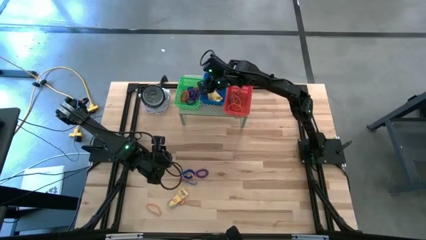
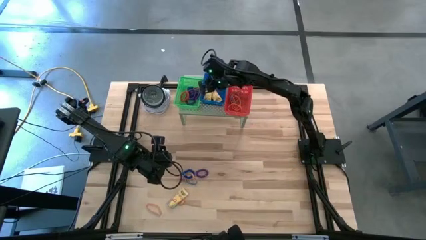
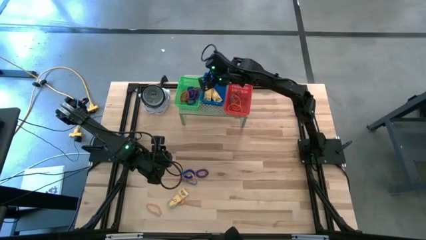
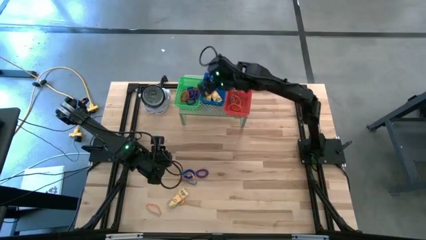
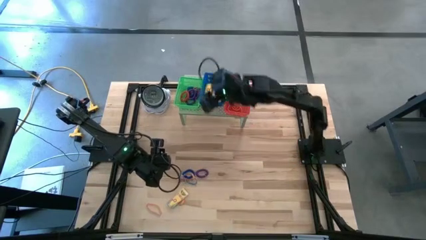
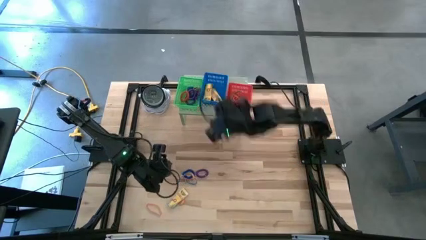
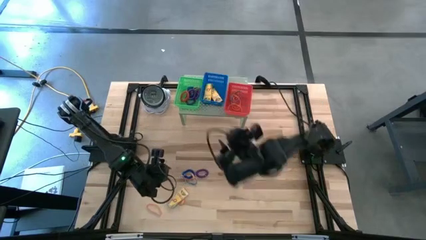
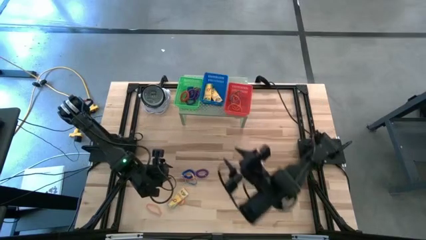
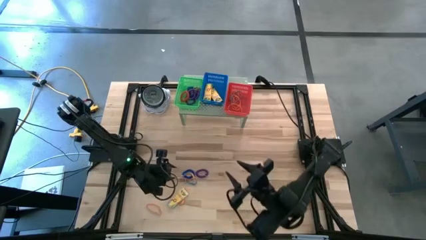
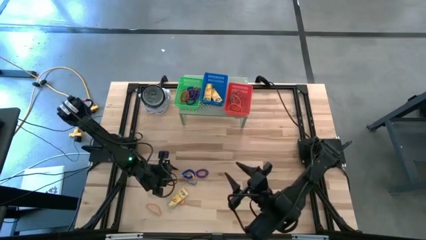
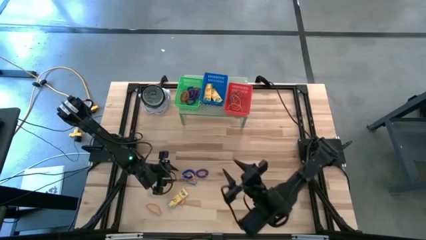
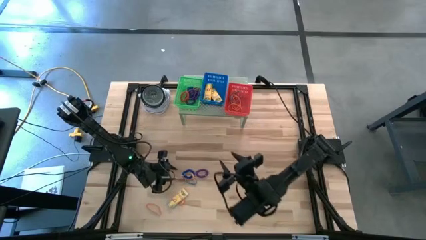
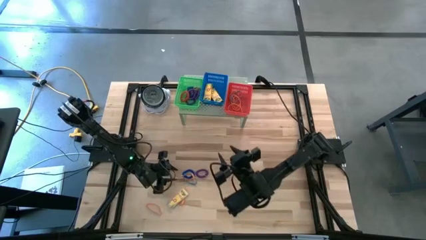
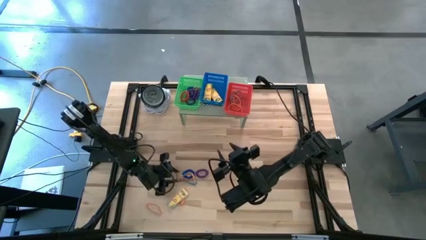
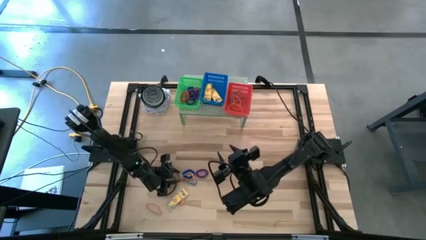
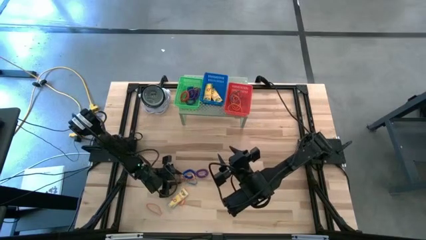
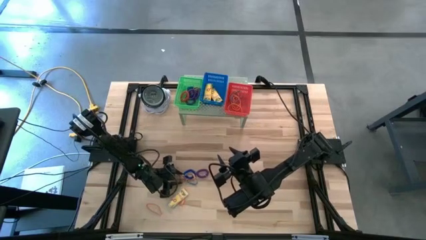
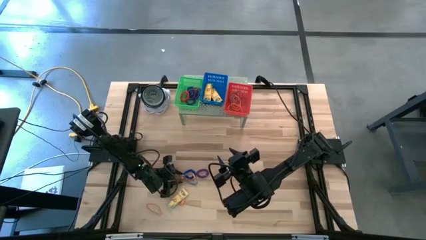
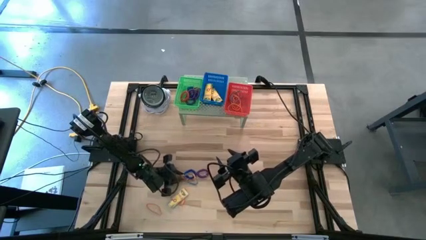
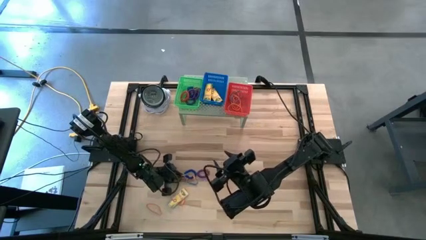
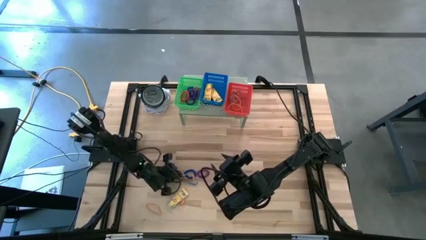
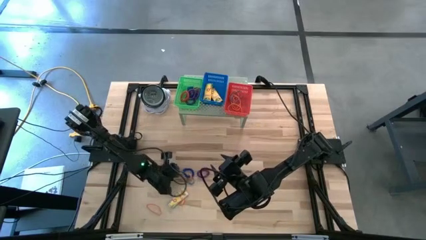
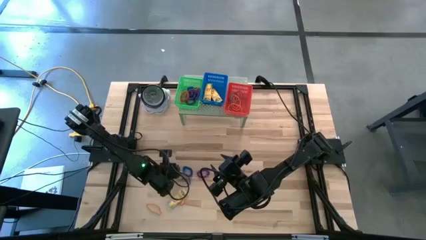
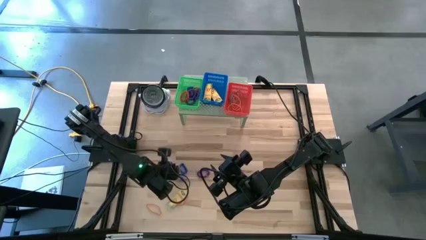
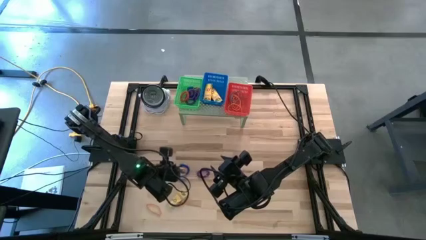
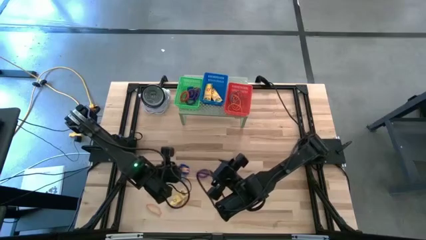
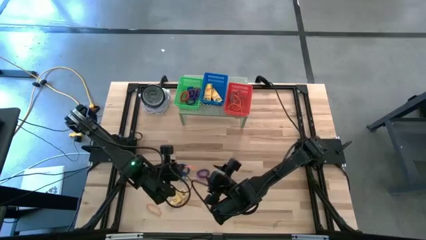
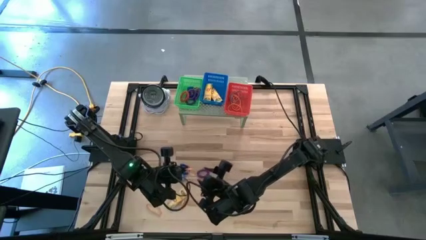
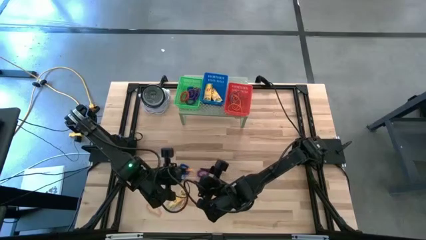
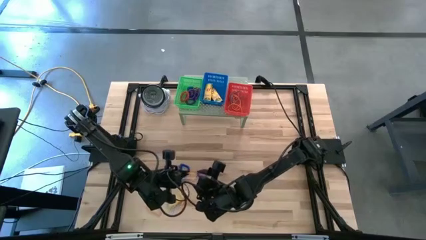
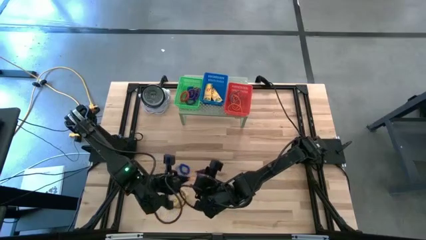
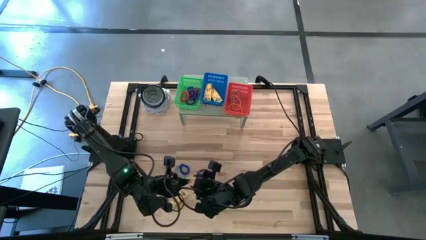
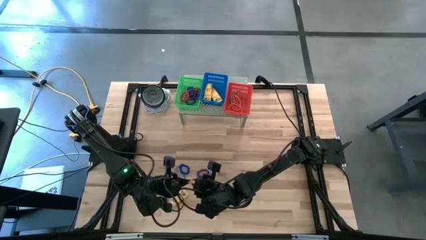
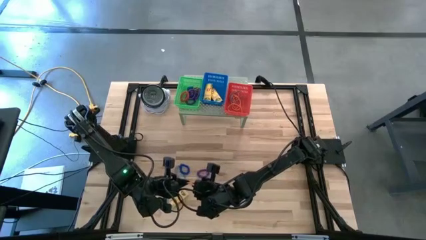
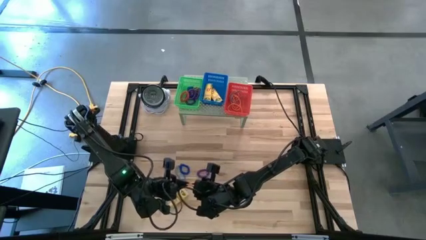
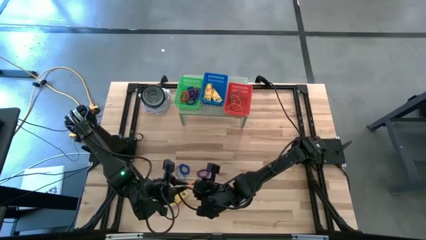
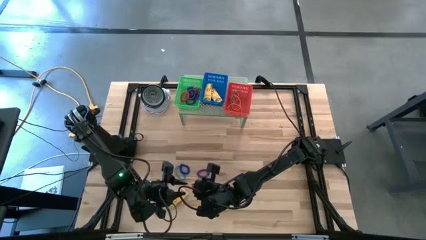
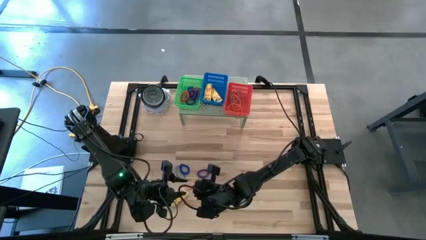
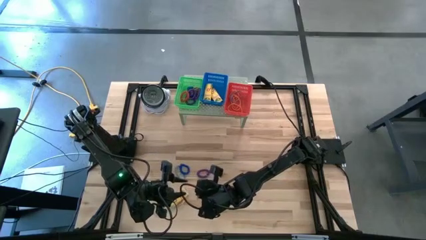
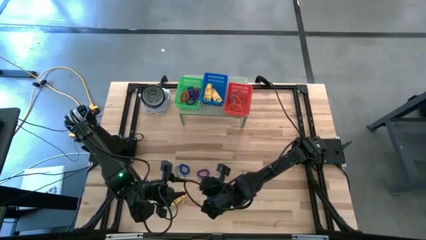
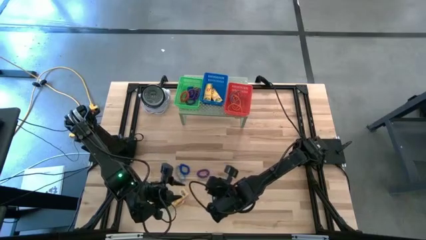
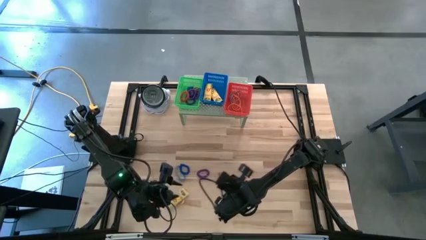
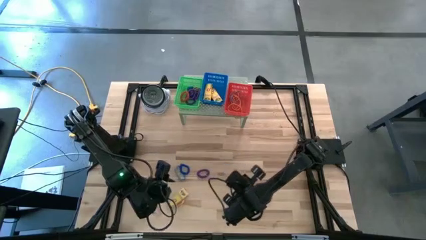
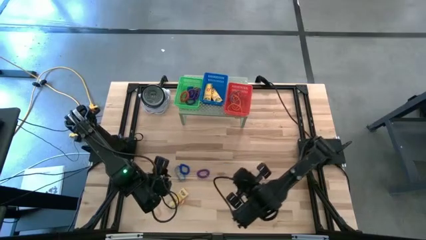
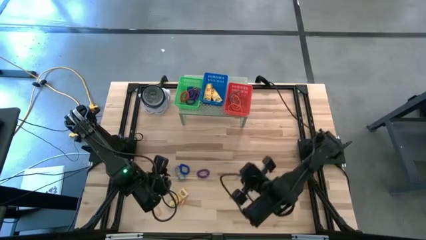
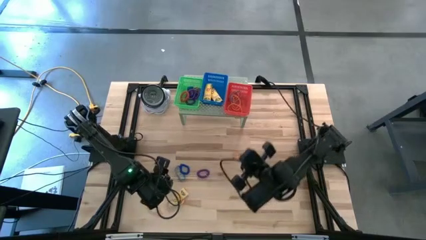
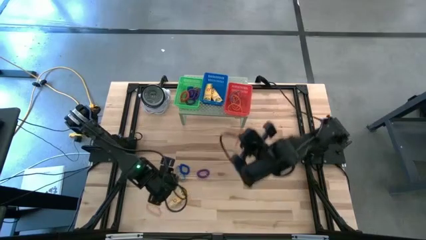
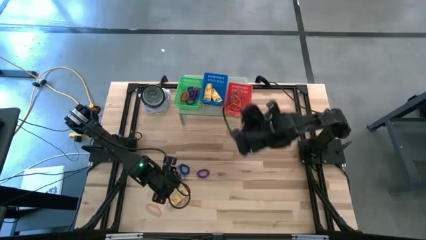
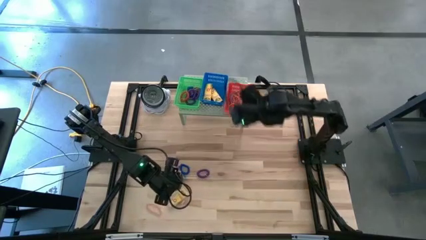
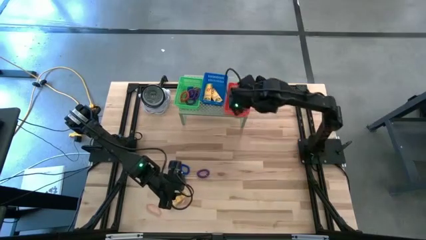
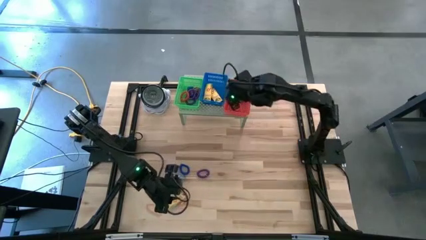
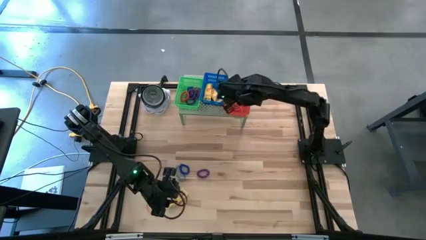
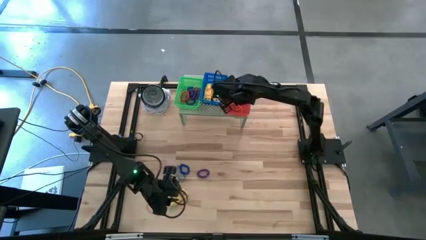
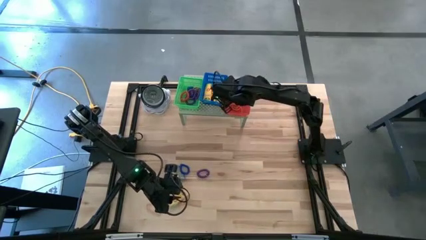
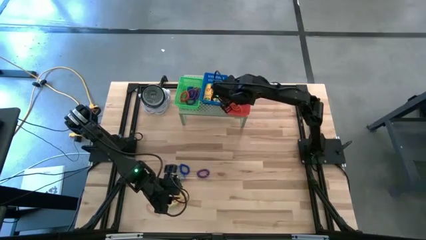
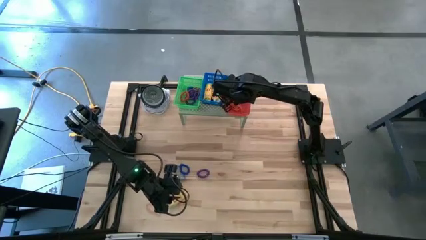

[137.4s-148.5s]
Task: Pick & Place Office Desk Supplies
Put the orange rubber band into the red bin on the shelf

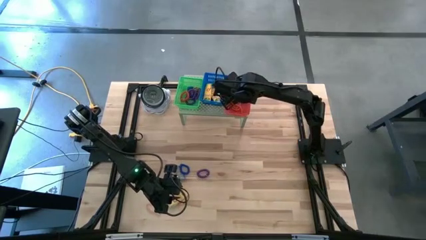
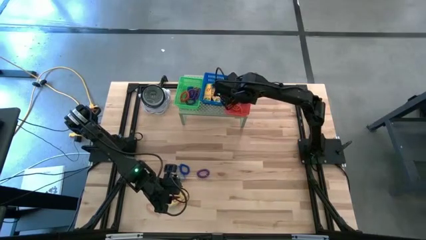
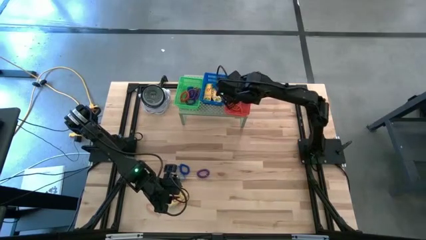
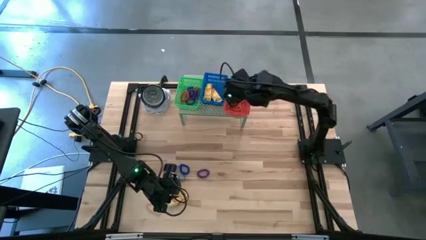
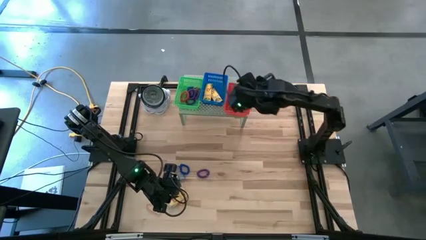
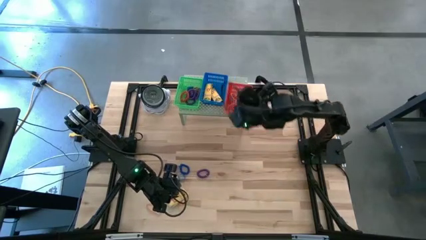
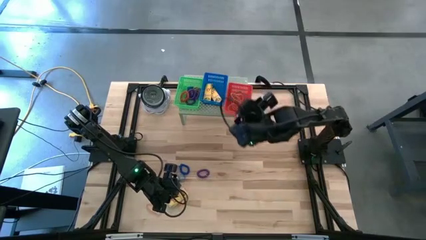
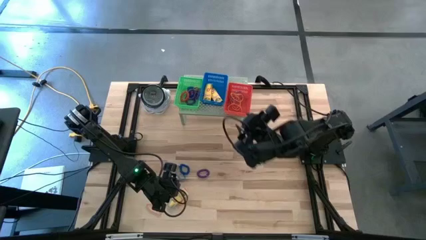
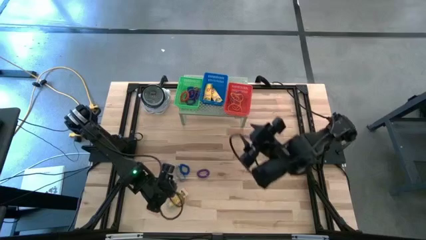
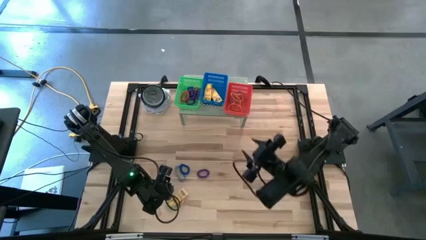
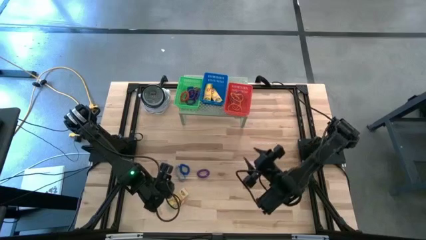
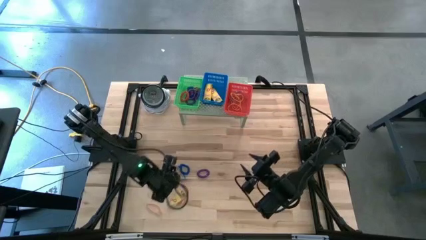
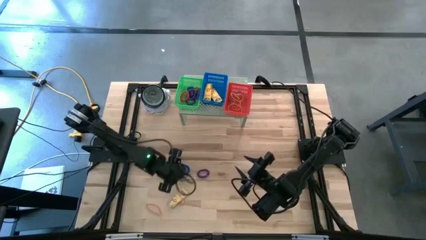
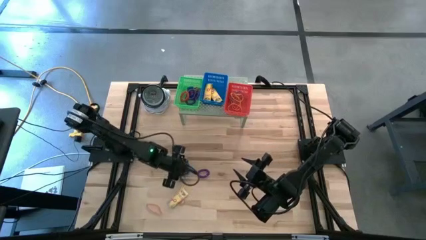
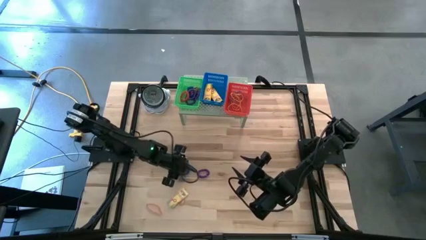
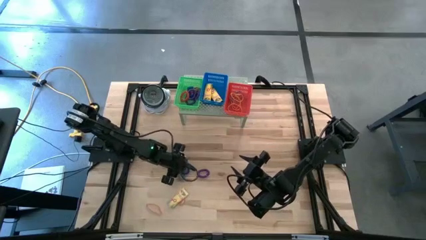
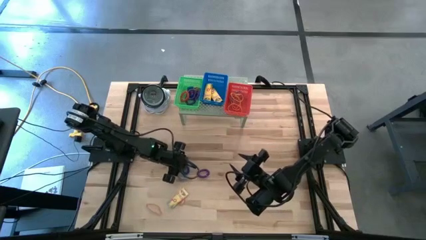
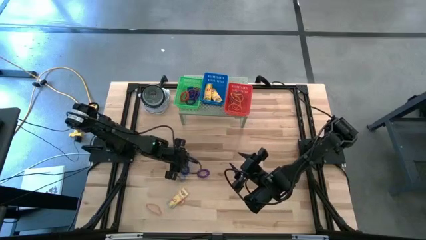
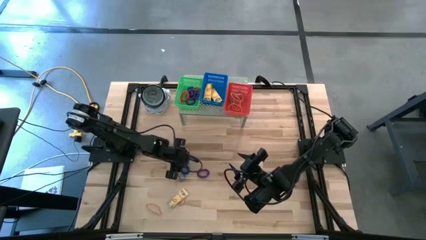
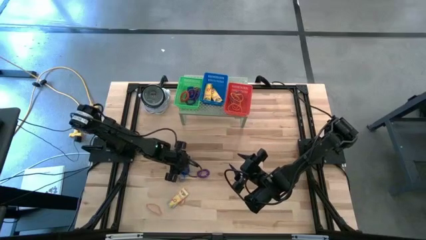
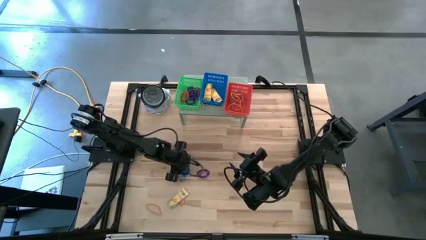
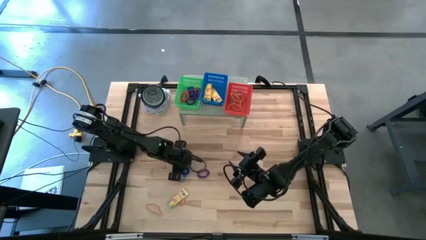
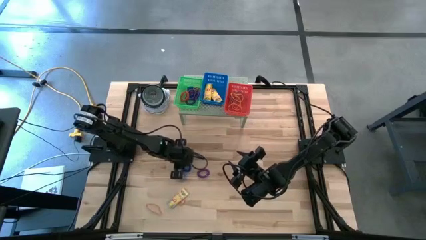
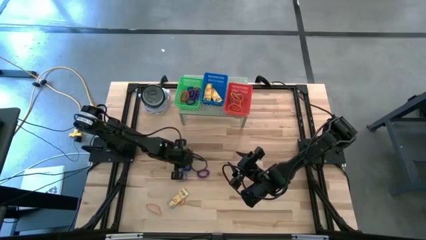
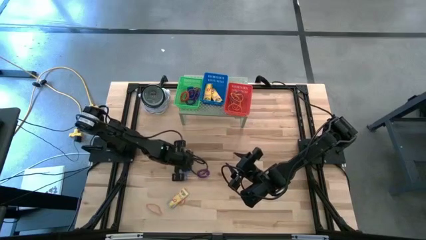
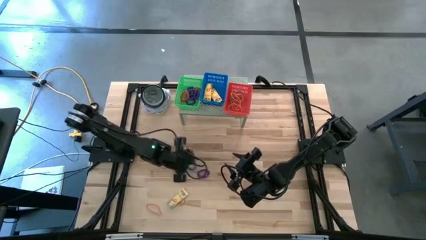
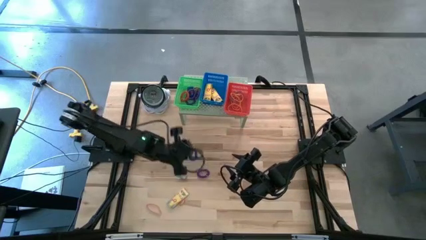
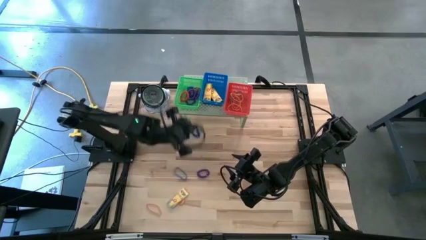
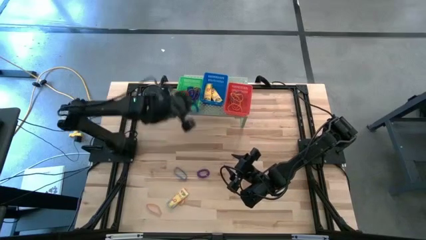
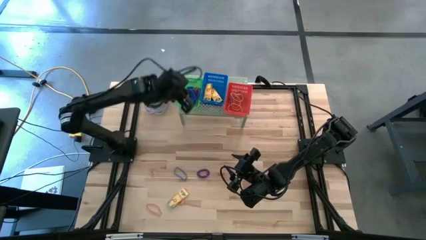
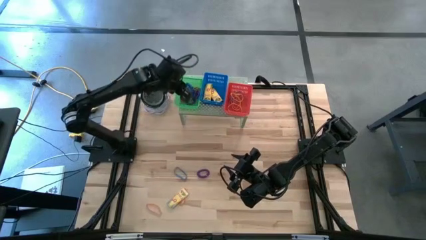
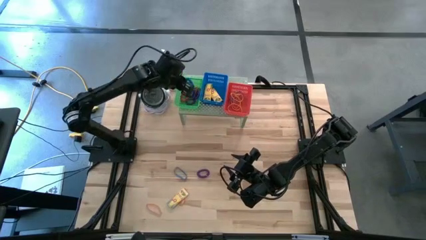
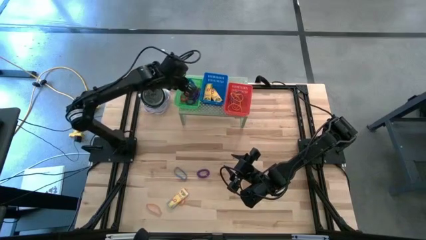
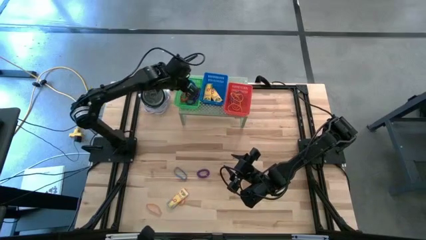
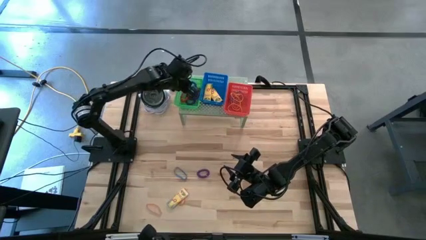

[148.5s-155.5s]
Put the blue spring keychain into the green bin on the shelf
